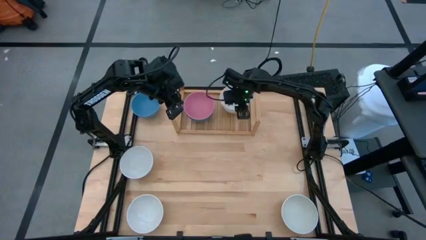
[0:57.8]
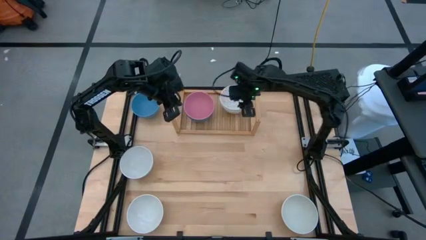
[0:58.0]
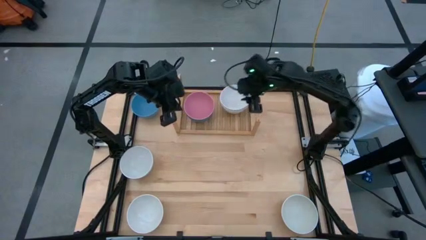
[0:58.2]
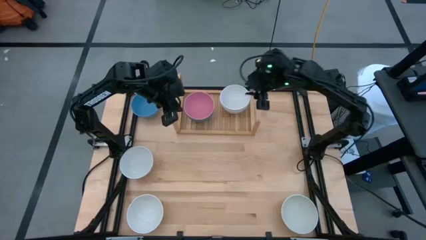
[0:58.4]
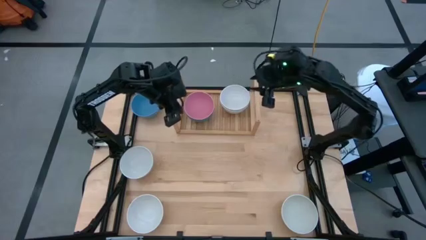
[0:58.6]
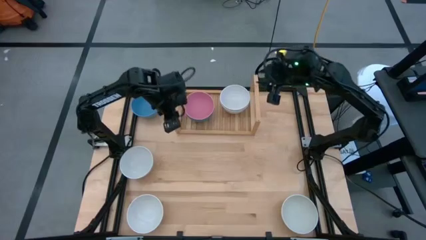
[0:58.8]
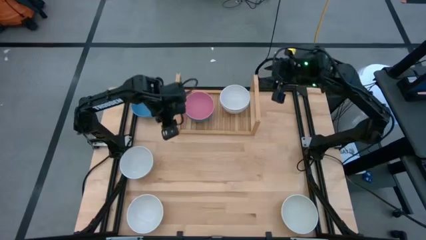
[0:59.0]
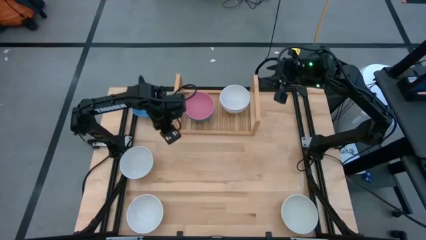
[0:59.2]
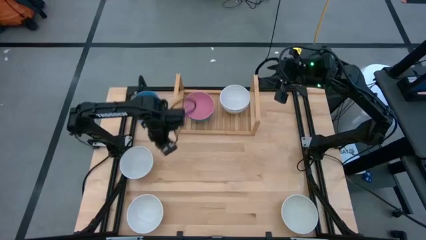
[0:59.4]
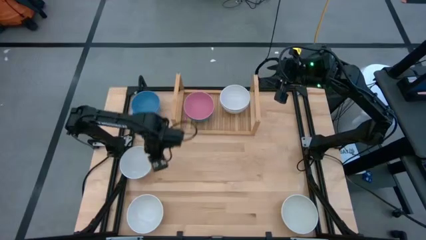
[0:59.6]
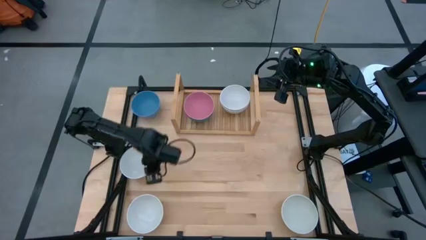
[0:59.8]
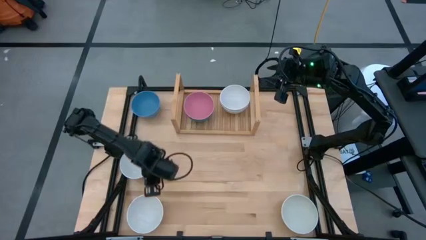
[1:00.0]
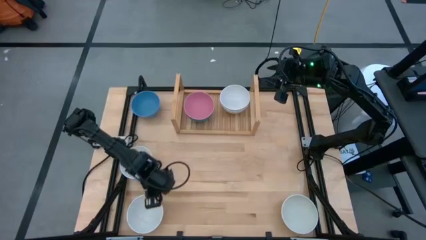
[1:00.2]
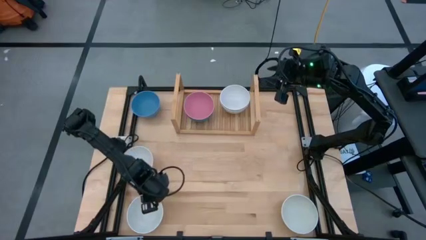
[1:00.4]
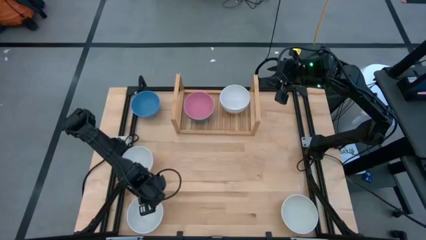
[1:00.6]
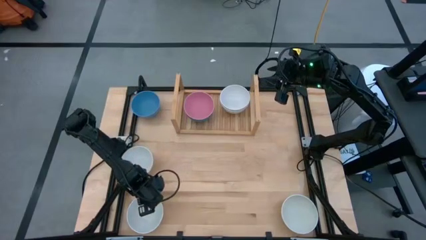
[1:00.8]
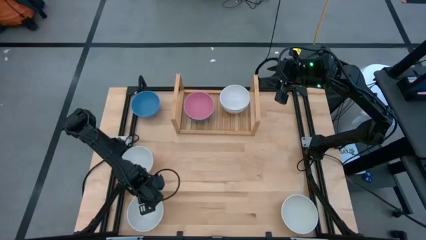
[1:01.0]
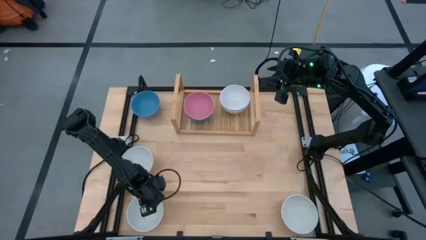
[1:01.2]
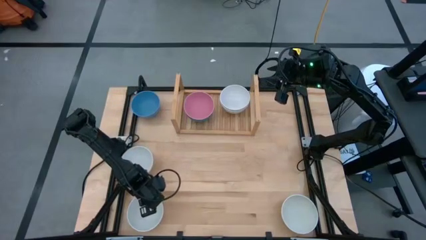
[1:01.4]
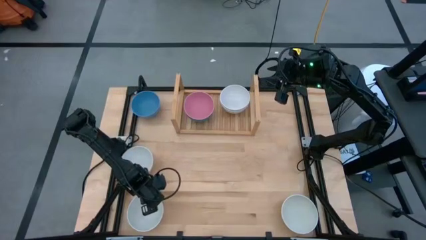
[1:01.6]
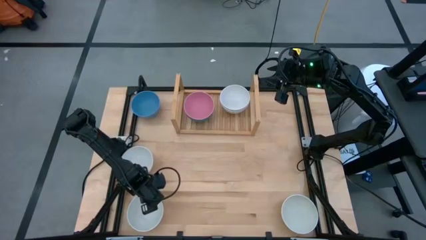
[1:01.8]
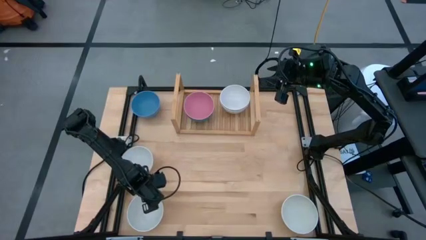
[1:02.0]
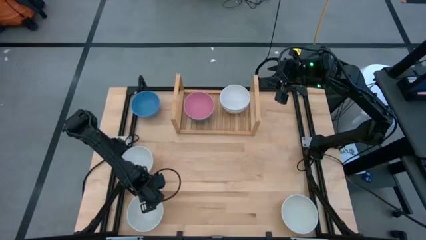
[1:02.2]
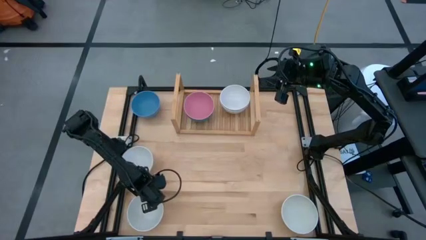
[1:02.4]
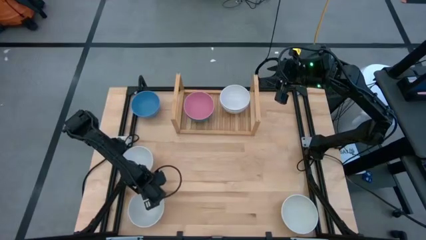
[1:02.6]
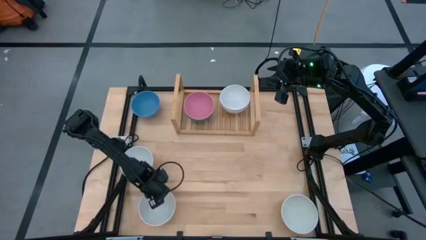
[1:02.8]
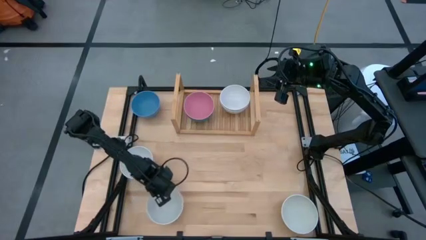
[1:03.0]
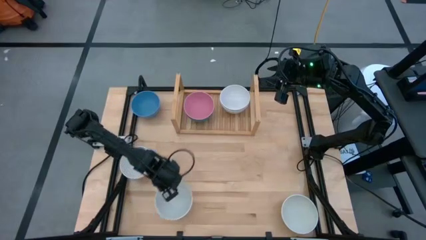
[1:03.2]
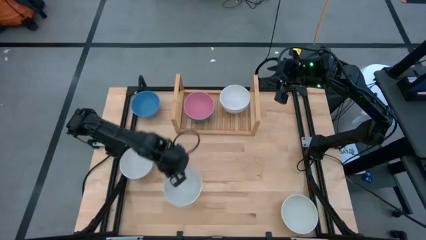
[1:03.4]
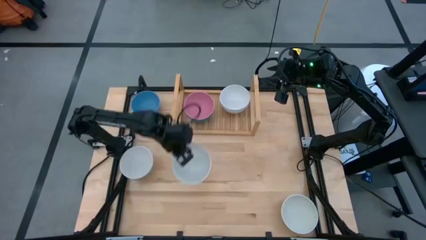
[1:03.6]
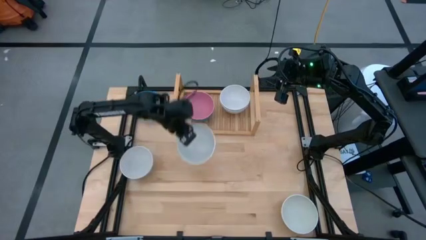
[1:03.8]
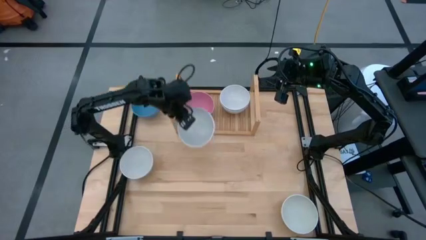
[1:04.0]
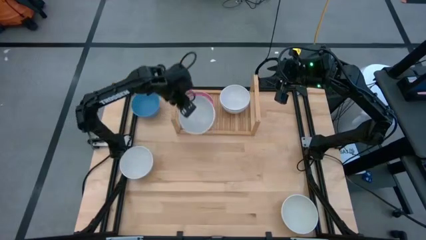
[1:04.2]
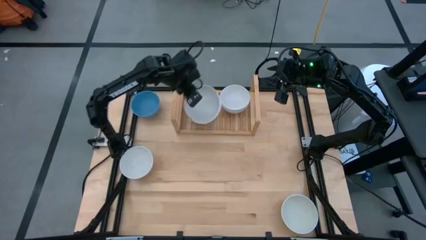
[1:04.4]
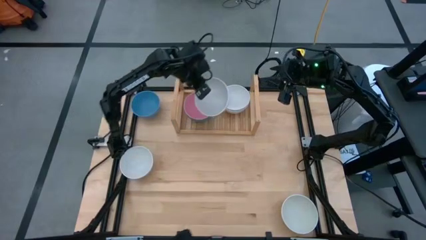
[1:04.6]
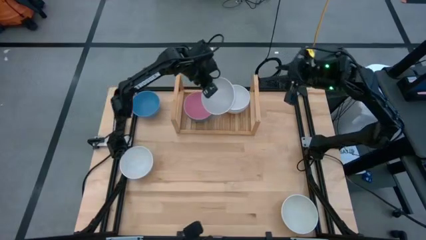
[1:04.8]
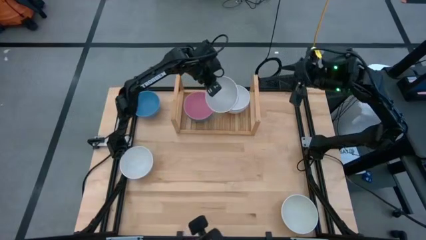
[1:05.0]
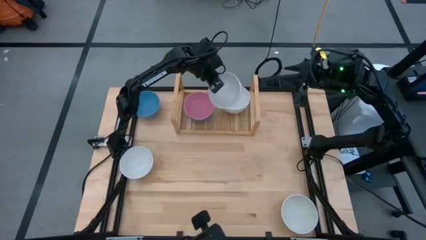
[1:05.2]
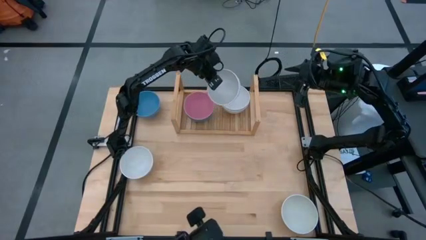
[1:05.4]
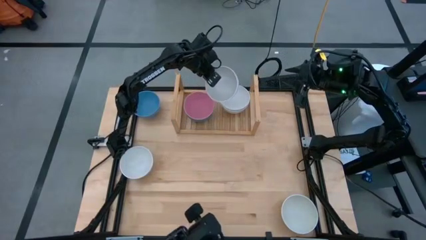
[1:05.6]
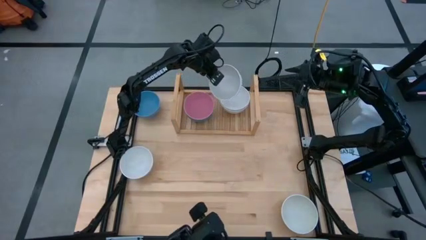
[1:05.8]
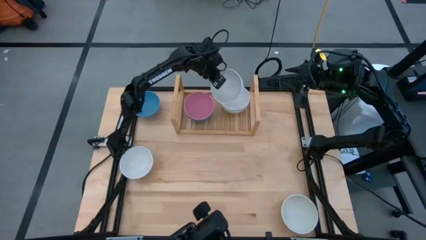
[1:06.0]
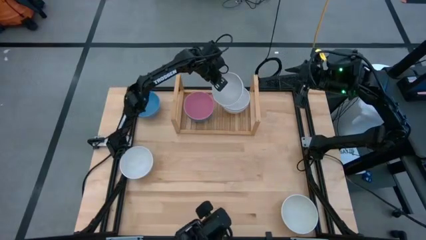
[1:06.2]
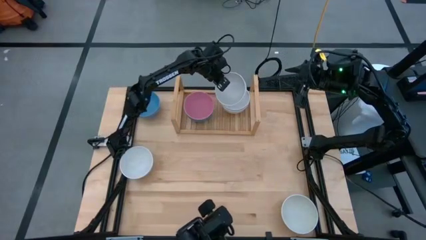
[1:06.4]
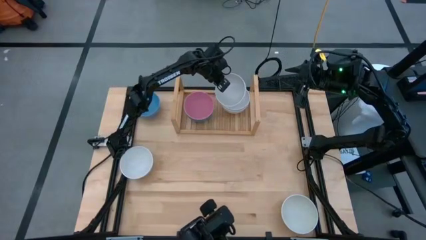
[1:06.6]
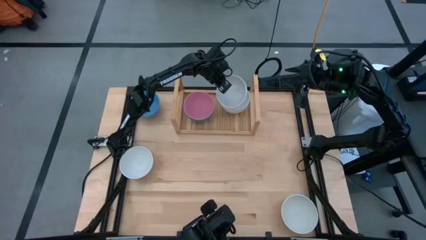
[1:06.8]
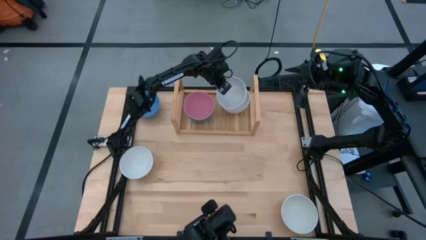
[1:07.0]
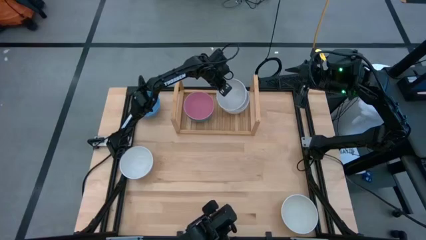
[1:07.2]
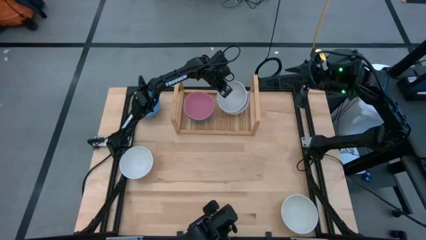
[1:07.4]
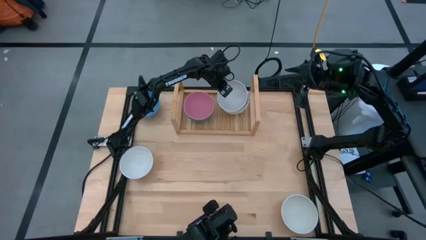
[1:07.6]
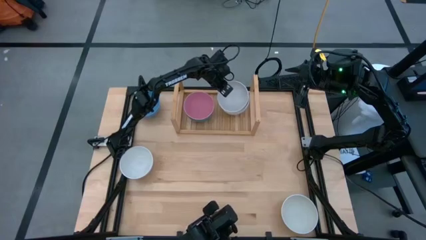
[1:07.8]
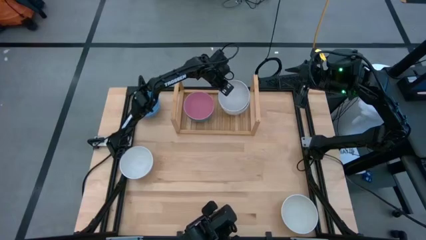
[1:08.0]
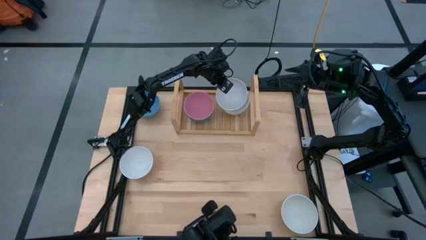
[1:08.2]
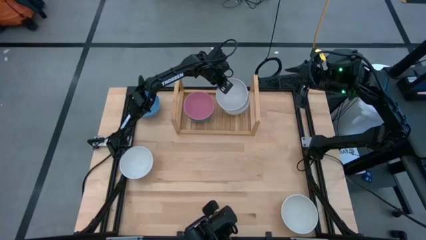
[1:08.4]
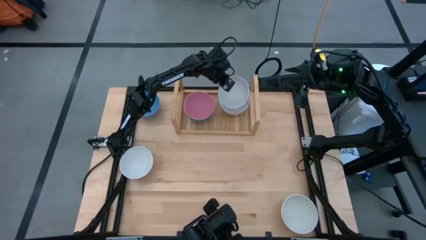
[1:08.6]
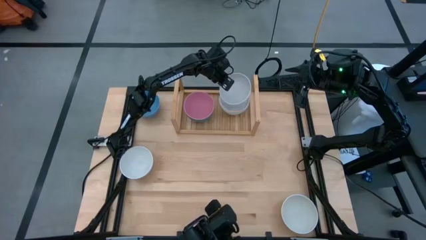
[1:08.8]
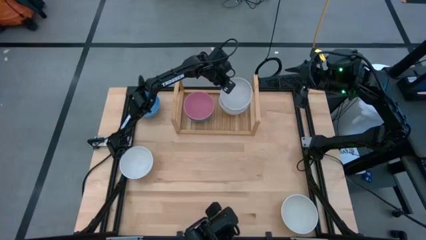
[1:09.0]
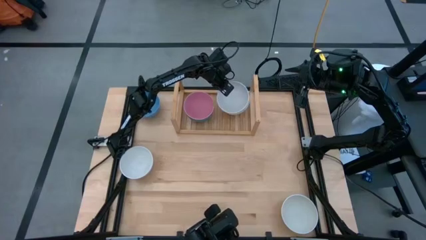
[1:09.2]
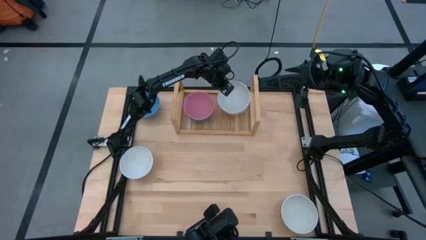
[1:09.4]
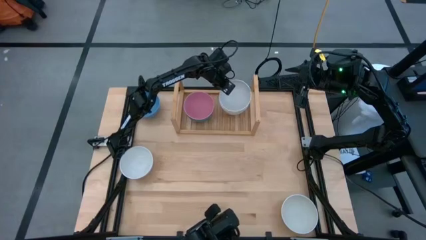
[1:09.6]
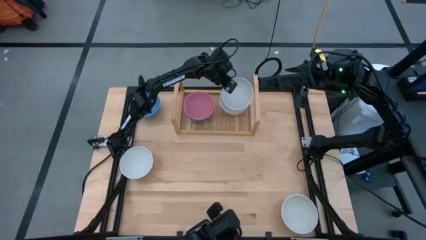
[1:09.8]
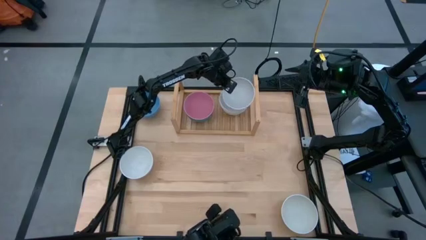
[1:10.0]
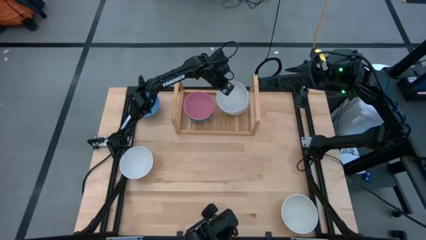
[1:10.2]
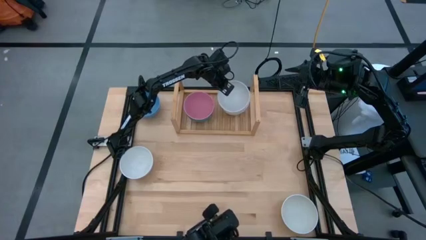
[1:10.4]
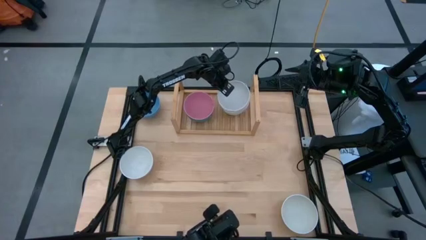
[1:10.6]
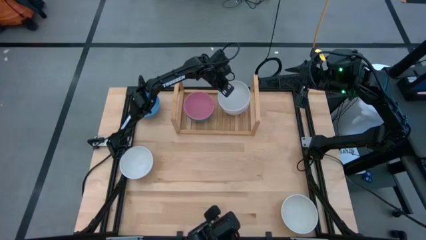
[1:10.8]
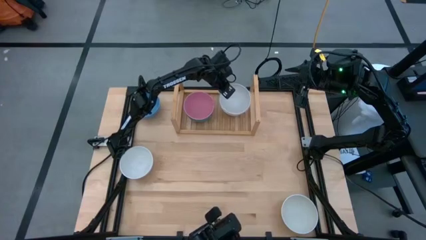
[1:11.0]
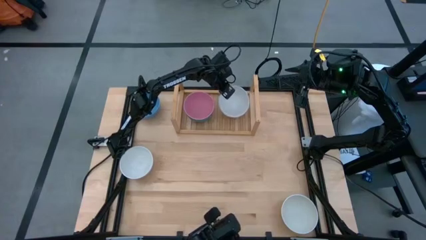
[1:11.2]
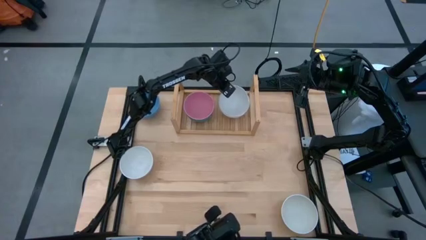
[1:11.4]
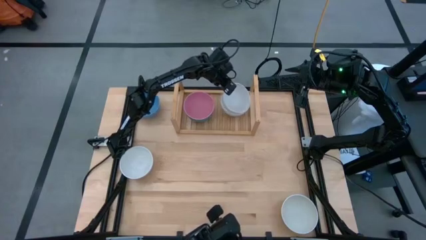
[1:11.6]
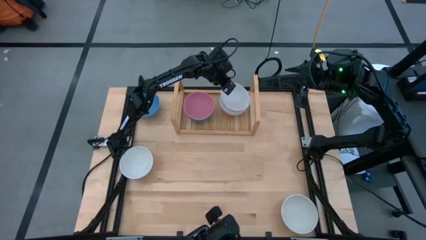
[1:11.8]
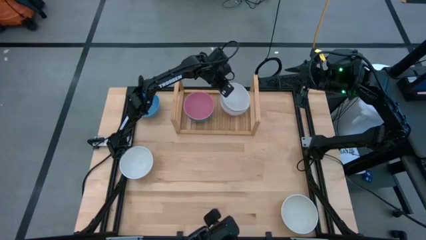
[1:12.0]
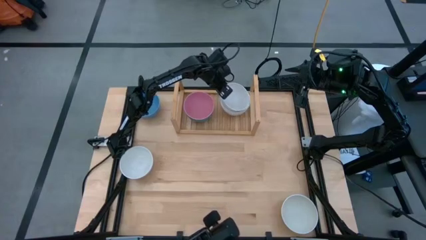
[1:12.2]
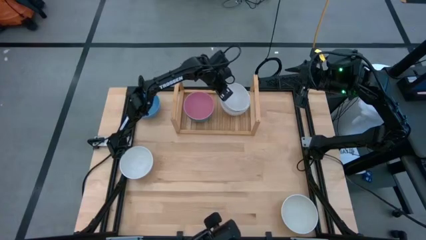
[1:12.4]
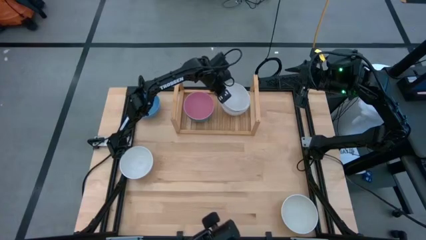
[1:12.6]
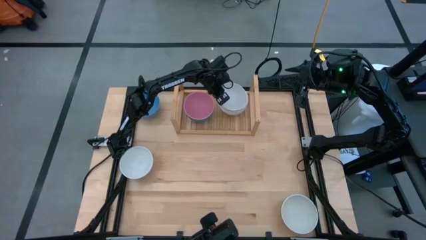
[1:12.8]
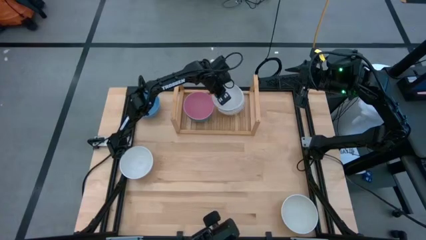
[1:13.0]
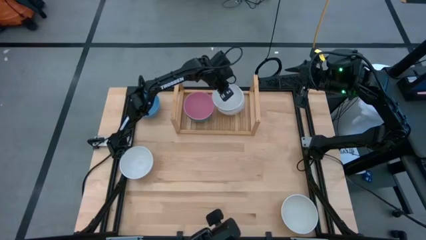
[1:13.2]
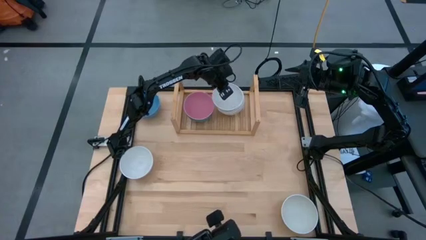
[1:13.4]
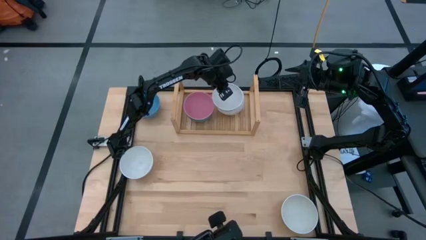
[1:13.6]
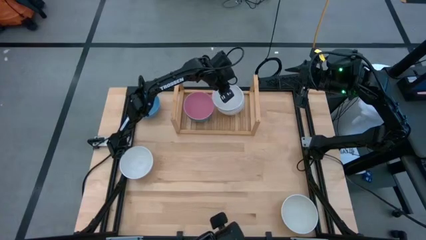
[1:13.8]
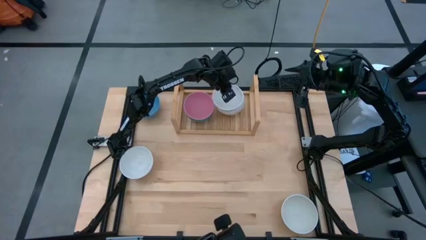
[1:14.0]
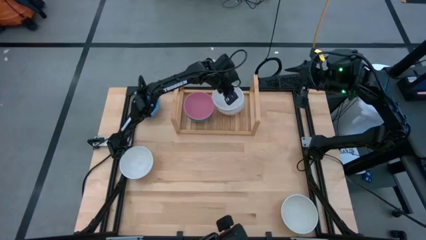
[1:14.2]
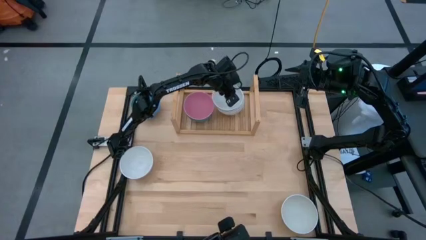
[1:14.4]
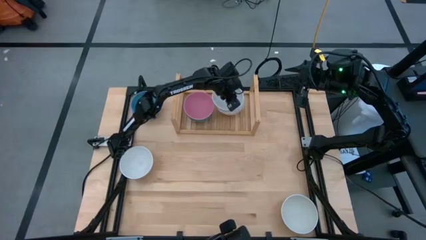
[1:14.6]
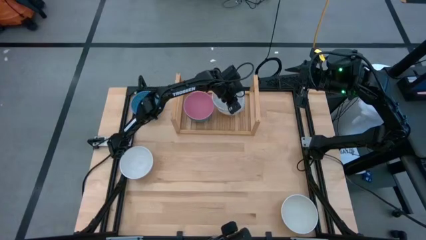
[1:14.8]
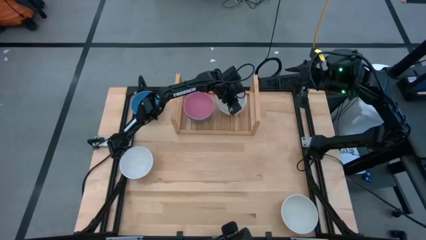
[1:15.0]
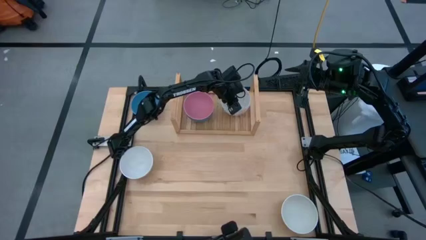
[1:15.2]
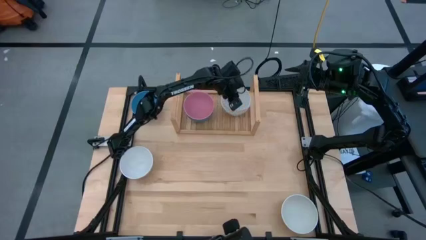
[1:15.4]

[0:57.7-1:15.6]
Task: Place and stack bowls onto a shelf
Stack the bottom left white bowl on top of the other white bowl on the shelf
